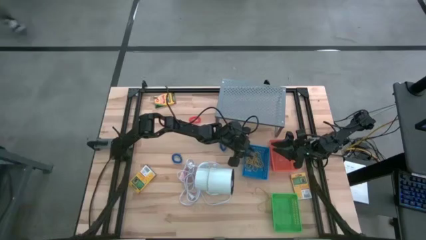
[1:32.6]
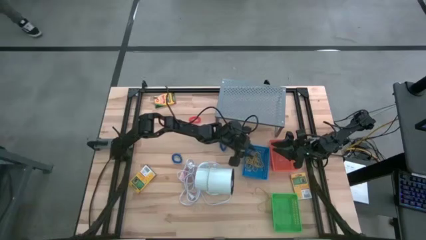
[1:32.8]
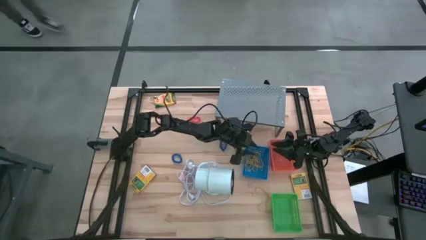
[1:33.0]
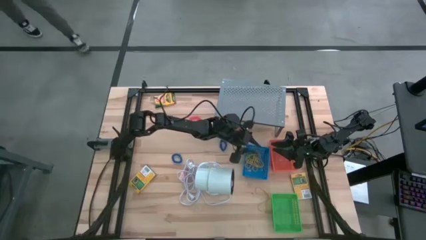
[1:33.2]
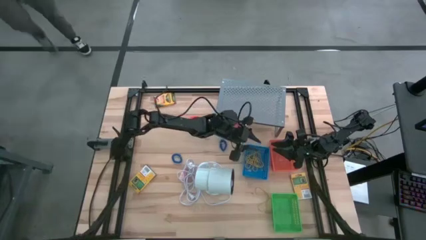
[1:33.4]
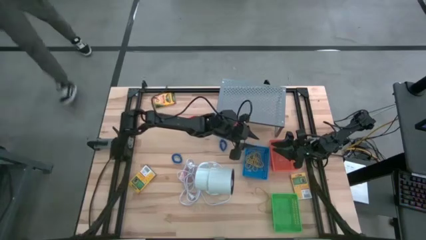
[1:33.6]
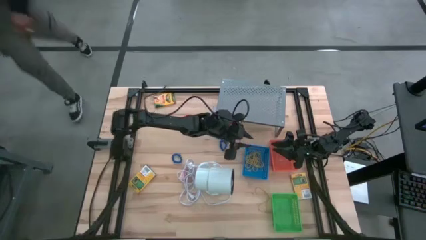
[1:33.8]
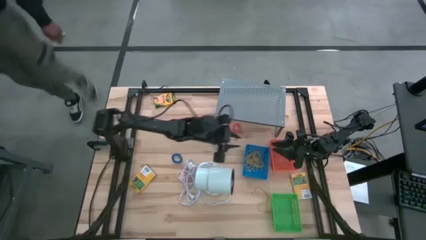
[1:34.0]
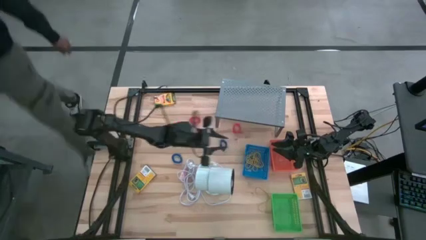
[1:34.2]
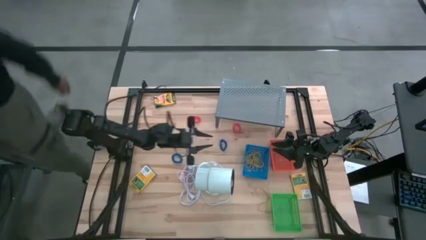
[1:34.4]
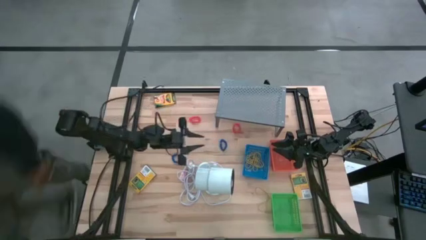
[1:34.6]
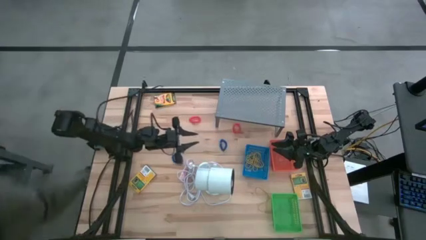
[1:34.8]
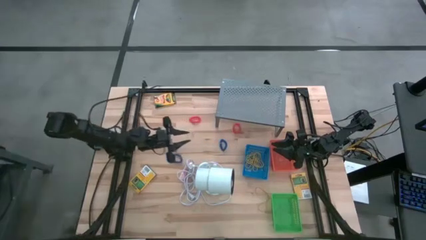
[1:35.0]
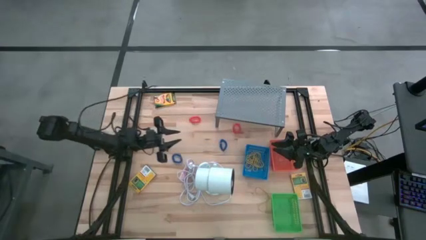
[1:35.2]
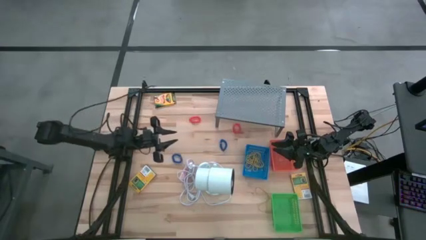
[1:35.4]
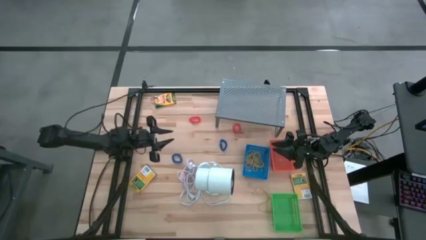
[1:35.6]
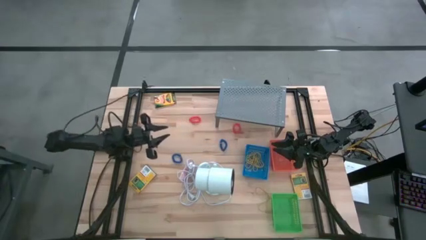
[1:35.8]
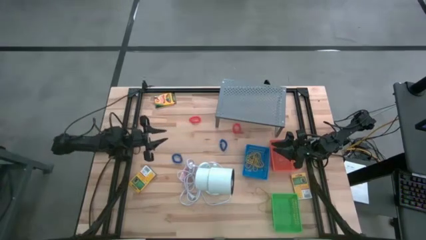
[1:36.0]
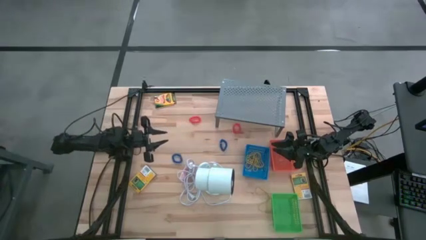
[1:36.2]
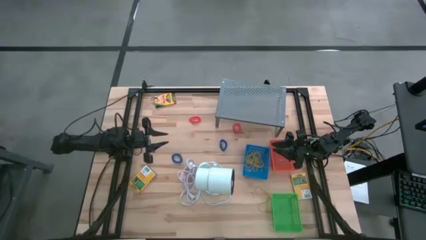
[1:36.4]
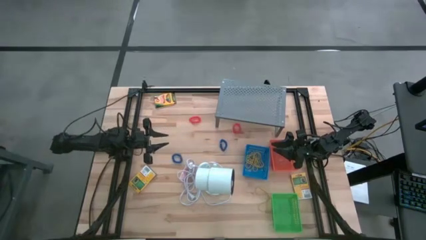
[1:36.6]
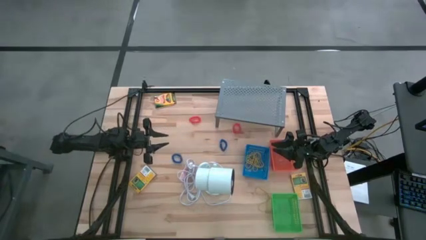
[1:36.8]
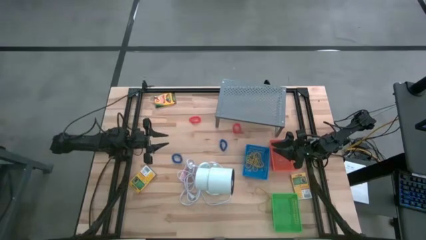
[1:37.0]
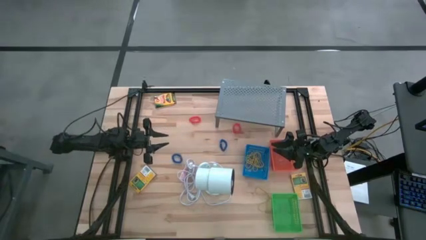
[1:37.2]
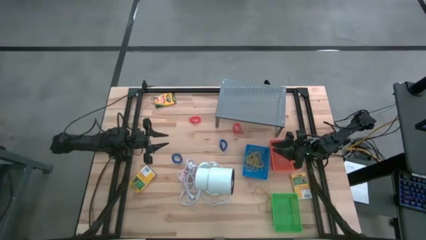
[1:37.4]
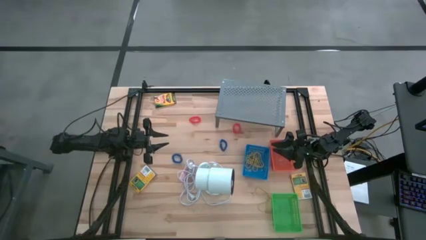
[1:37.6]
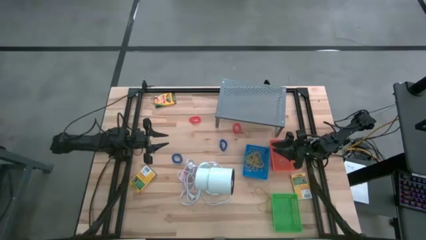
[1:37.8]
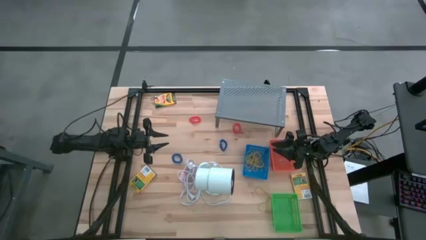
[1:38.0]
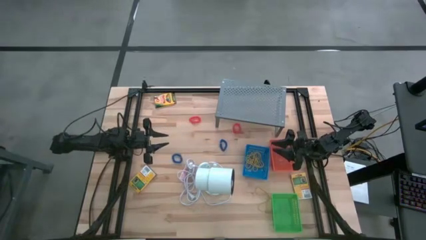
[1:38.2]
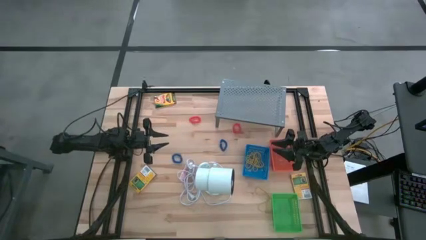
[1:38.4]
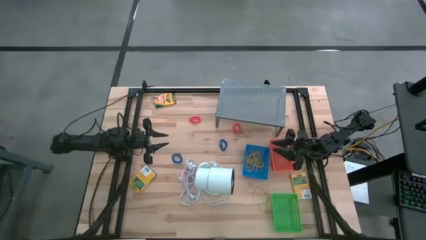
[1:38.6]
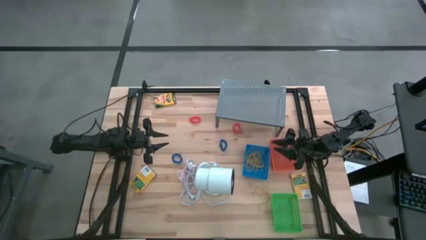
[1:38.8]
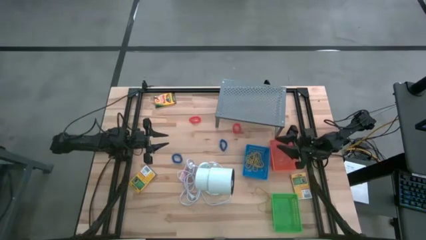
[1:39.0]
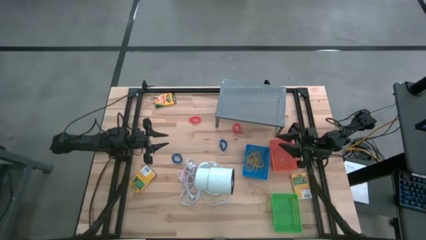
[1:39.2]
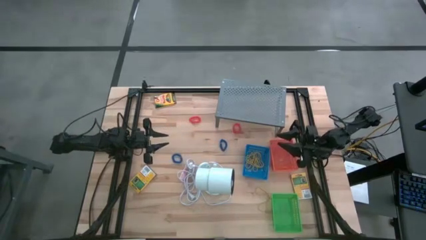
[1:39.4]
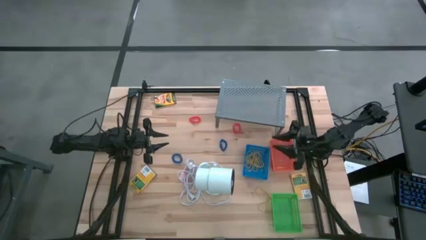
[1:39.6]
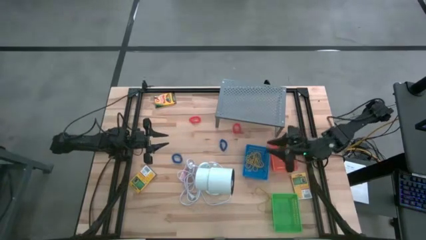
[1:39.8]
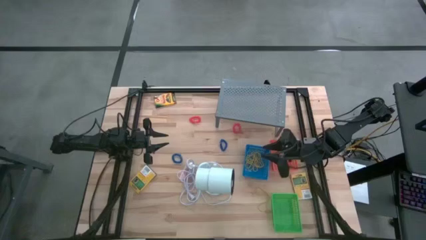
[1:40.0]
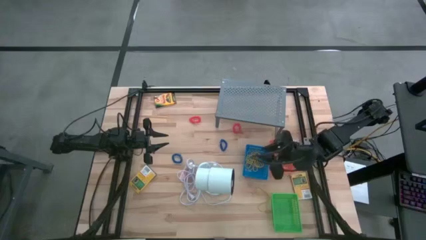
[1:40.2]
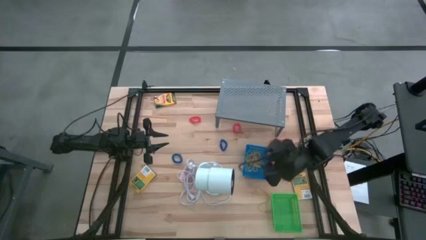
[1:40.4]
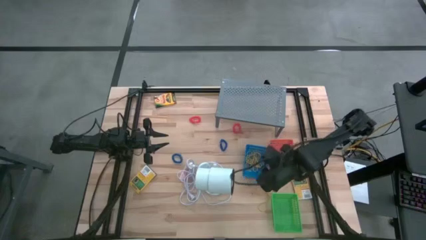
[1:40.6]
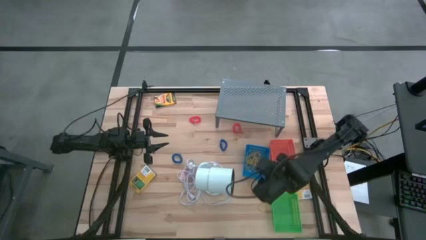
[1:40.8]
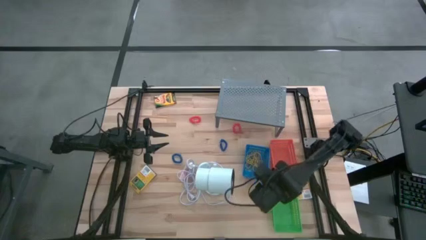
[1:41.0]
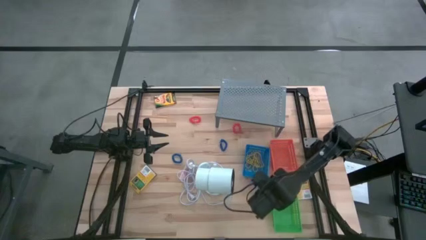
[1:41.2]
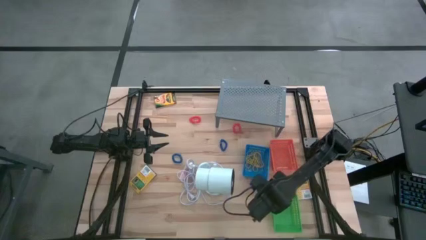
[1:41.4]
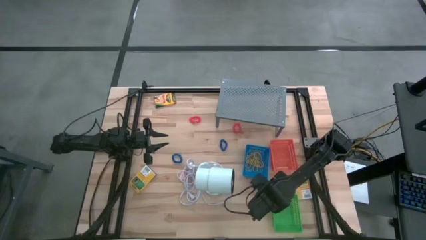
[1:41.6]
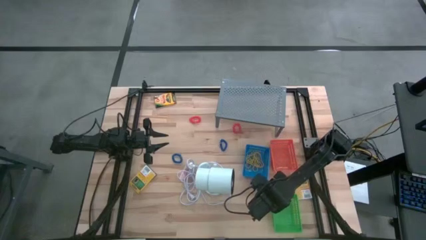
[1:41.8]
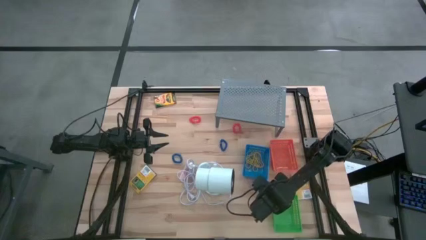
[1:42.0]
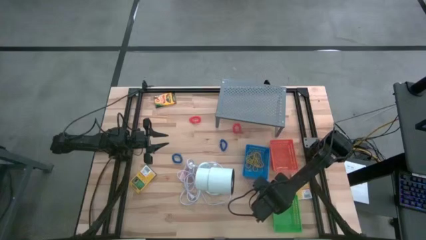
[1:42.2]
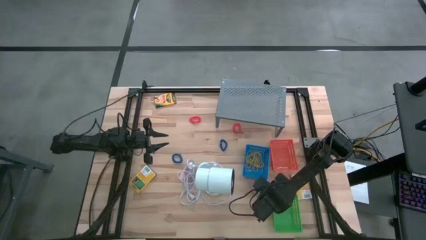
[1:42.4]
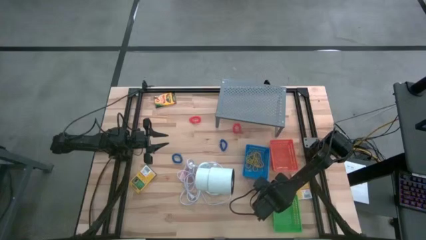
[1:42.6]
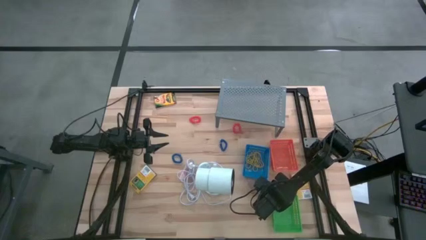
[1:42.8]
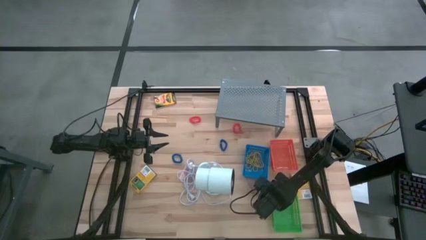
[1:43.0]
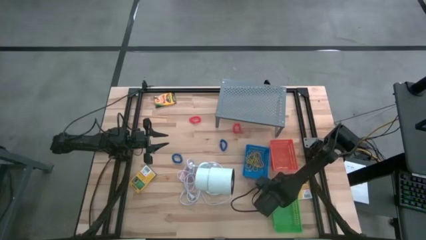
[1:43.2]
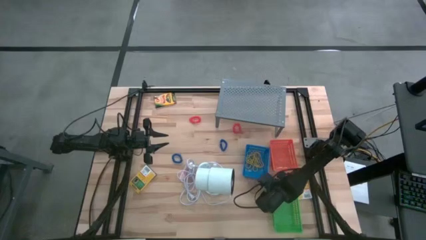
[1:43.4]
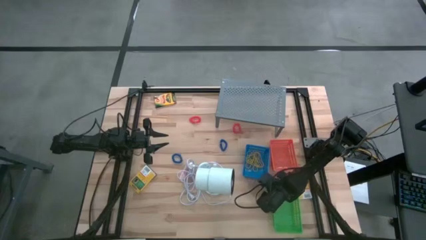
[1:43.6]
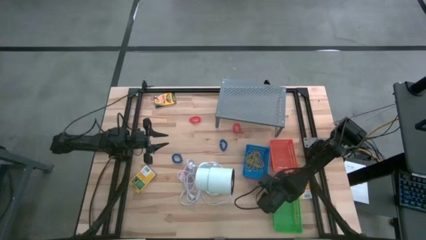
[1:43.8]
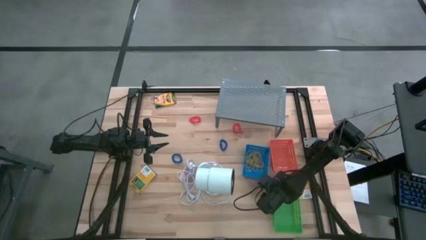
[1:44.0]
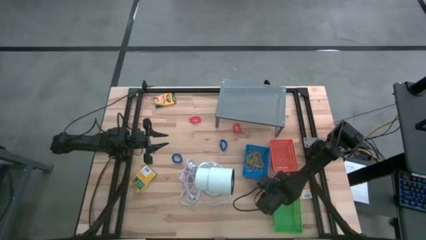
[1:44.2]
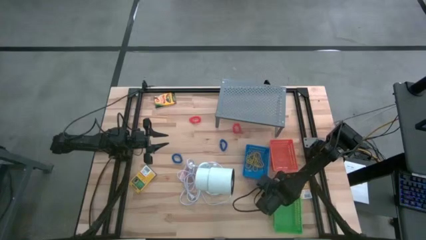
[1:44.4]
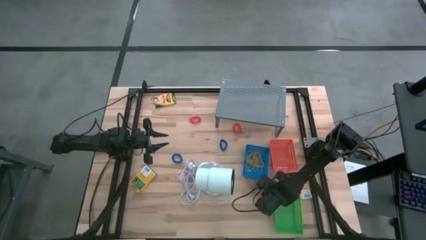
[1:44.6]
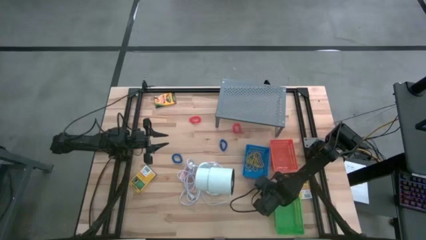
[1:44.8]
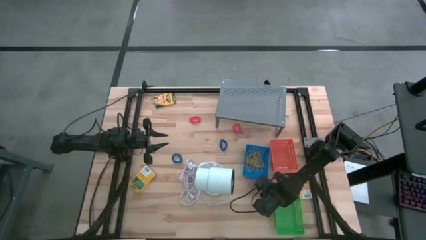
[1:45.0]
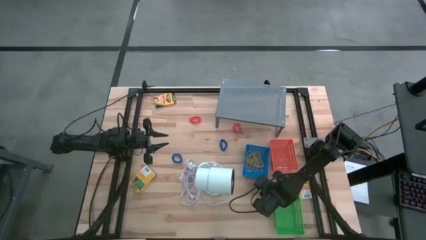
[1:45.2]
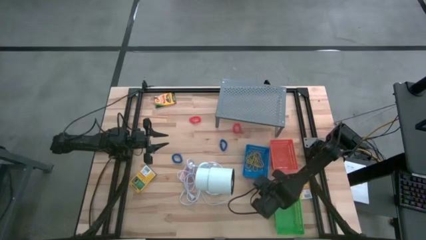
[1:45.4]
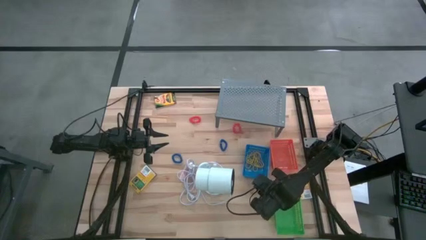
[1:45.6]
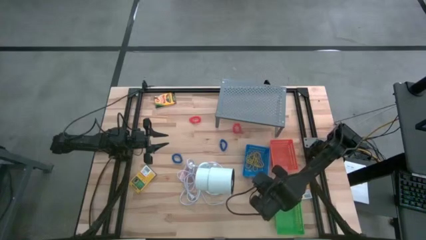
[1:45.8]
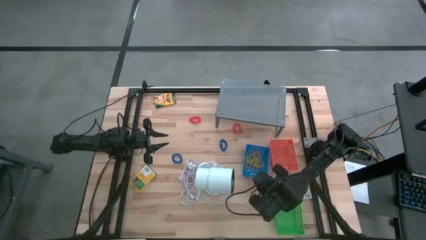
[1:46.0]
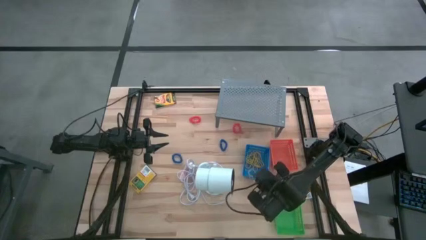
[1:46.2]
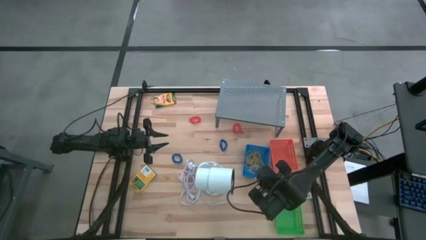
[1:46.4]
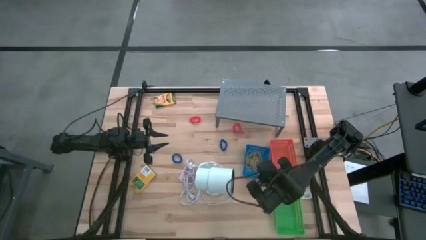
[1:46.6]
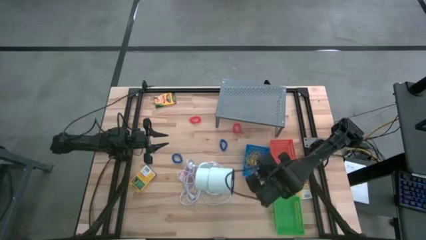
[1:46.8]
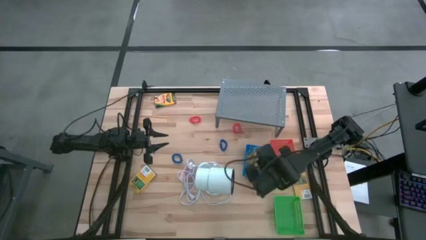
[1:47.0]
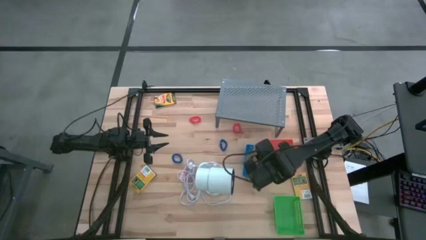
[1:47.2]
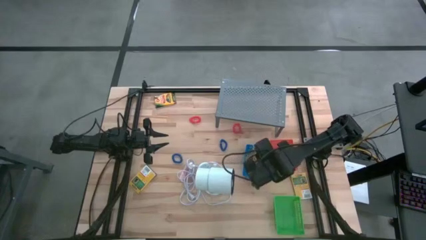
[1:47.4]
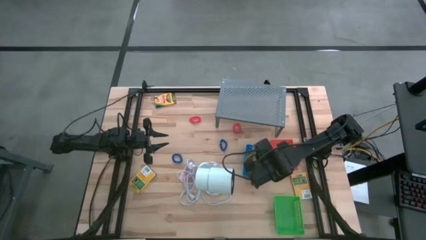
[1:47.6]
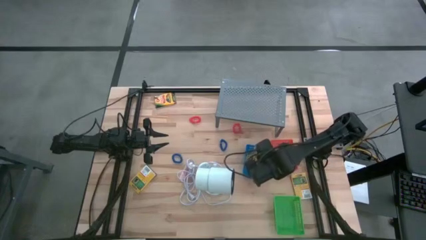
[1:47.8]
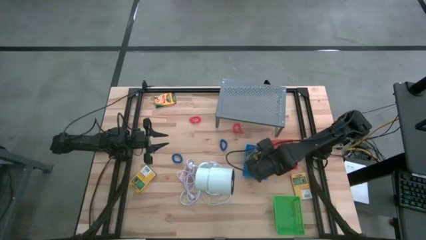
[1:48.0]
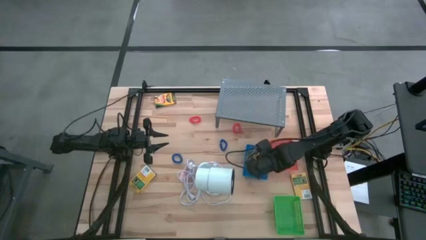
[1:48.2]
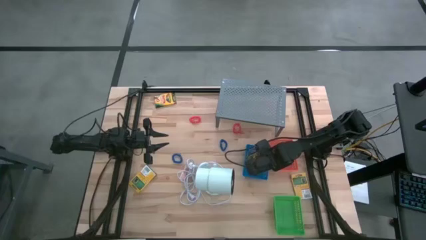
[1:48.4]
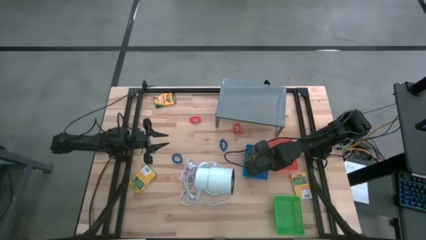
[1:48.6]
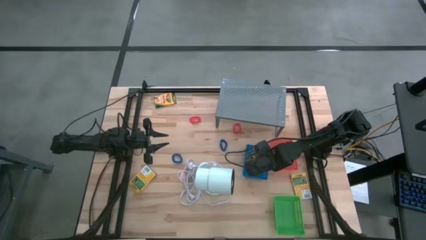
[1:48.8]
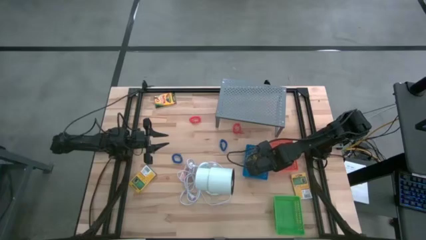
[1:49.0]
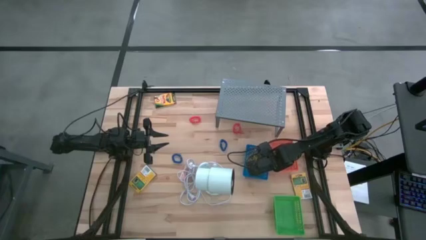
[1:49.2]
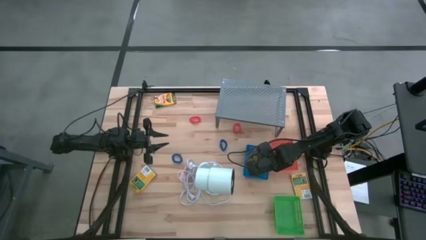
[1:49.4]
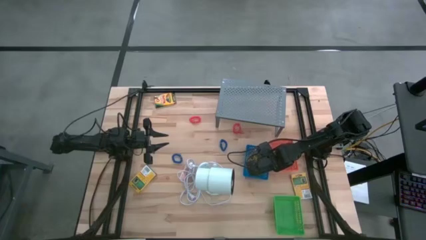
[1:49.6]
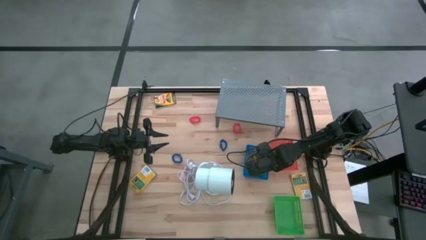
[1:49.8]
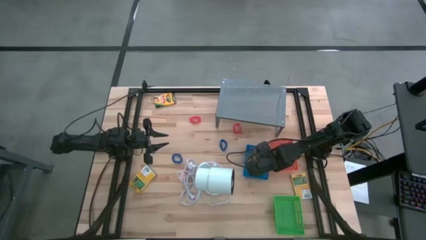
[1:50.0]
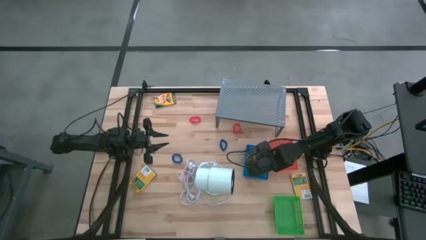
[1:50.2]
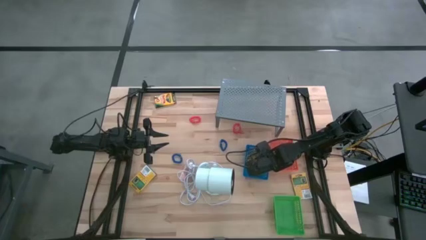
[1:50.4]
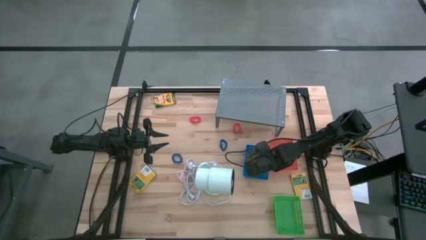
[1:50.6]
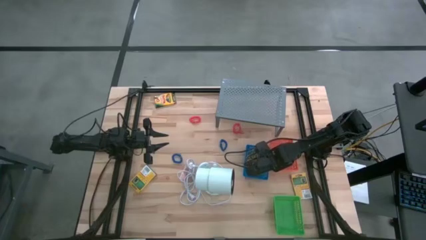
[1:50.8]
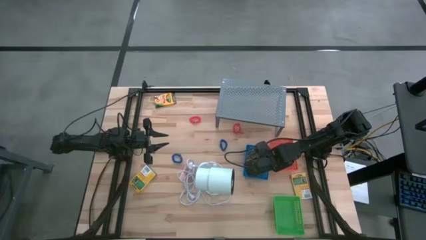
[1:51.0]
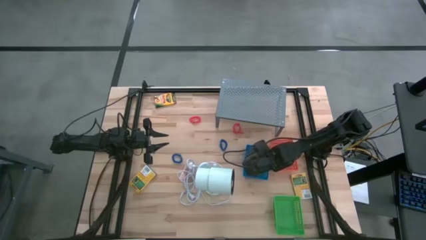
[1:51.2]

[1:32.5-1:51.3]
Task: Pick & Place Office Desk Supplies
Put the yellow rubberband into the blue bin
